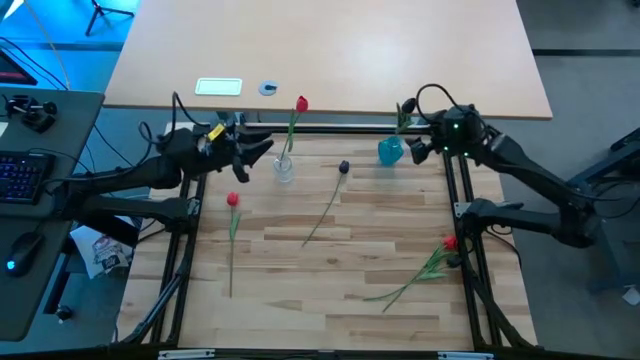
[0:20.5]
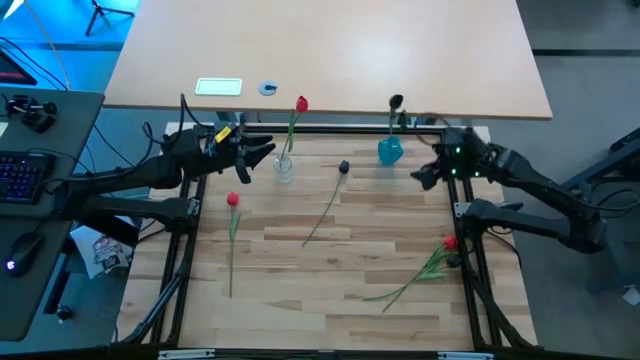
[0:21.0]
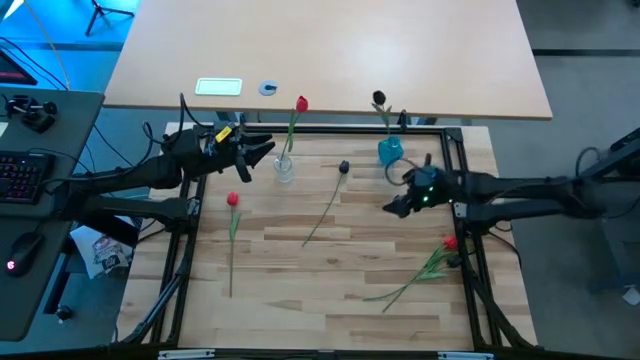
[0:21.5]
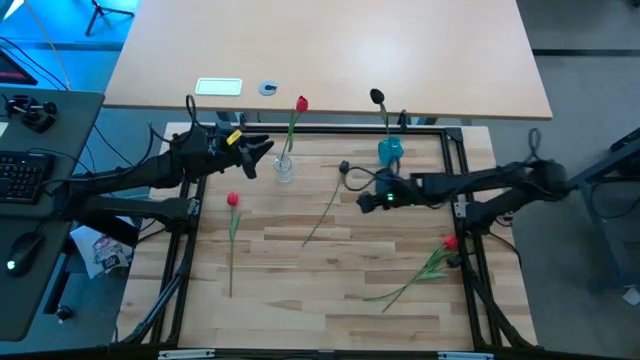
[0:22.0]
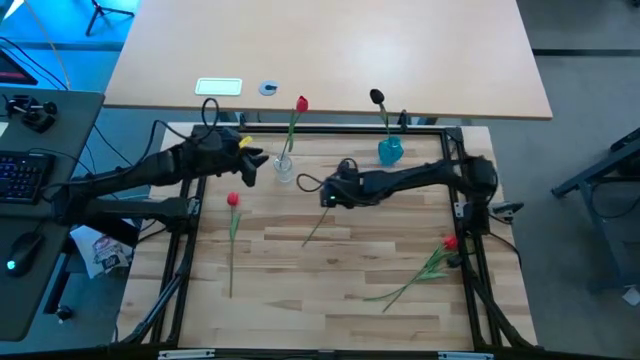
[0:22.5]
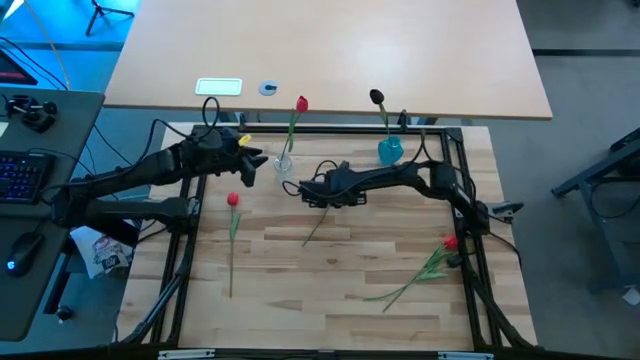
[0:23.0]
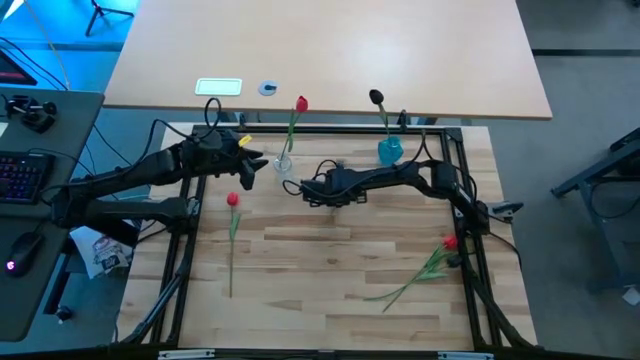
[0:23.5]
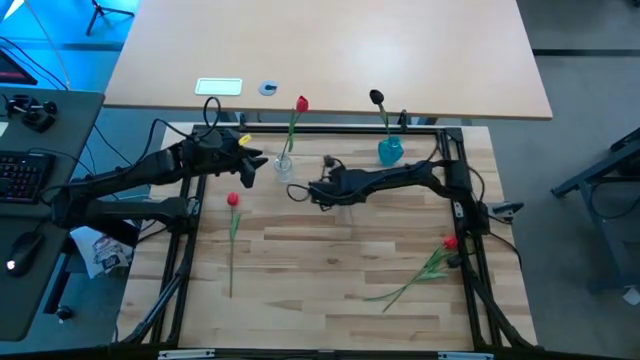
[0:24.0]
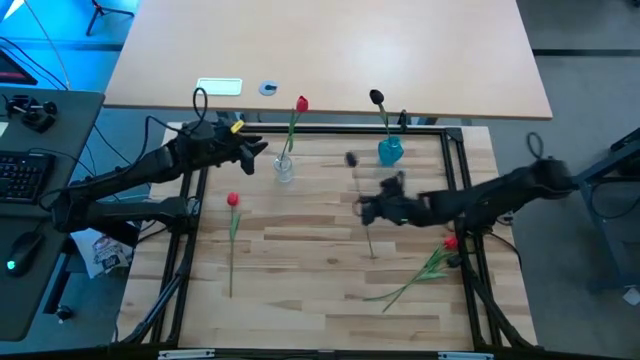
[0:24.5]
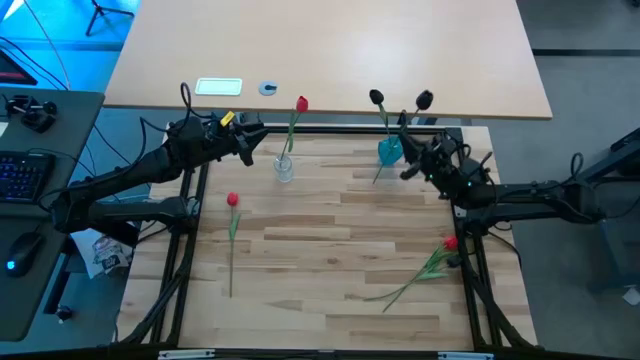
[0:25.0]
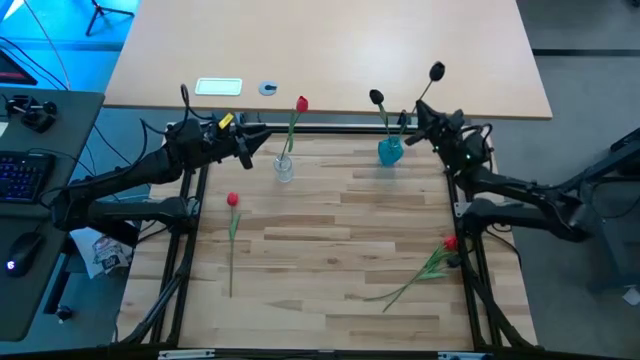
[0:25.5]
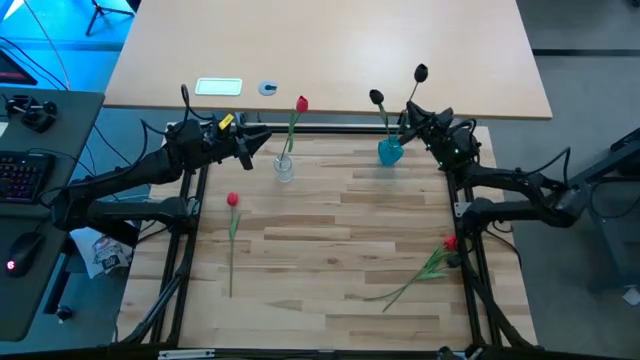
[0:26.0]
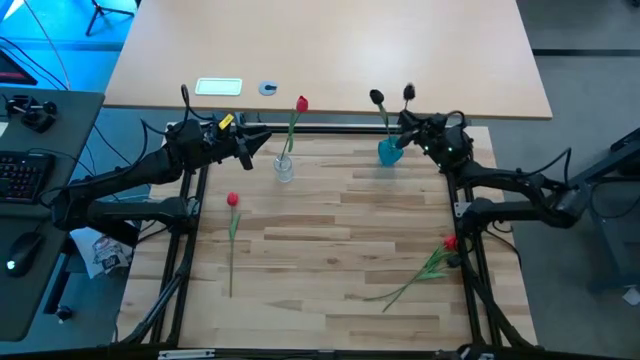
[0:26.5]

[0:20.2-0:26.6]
Task: Sort flowers into vase by color
Put the top black flower into the blue vase

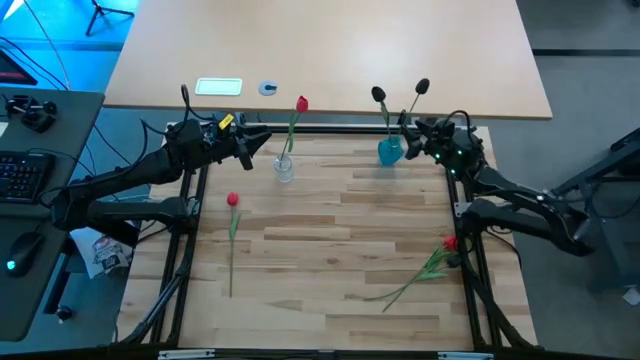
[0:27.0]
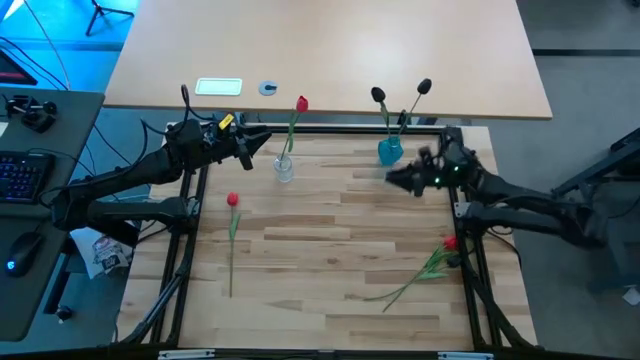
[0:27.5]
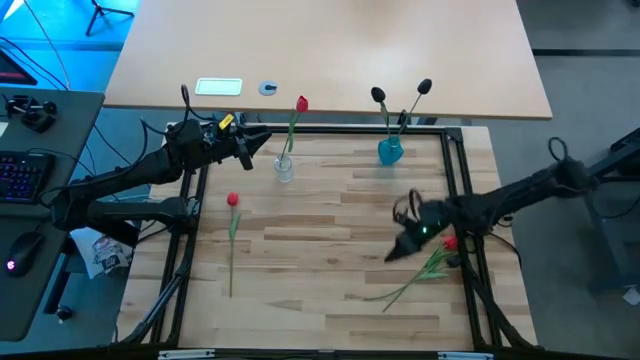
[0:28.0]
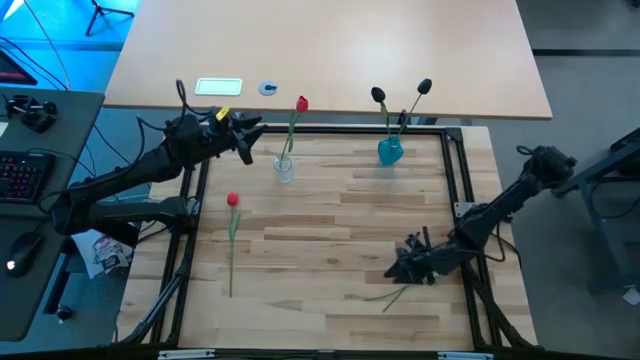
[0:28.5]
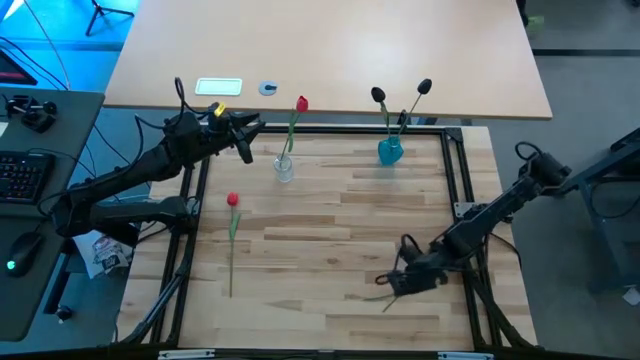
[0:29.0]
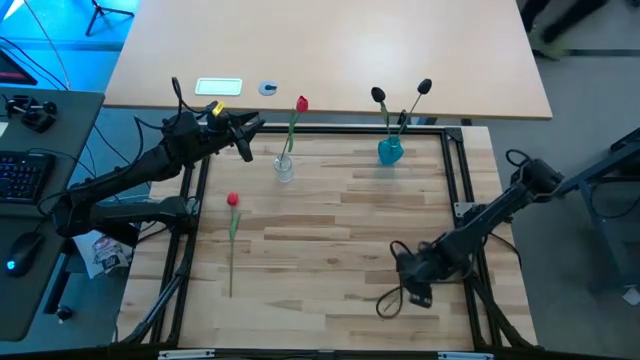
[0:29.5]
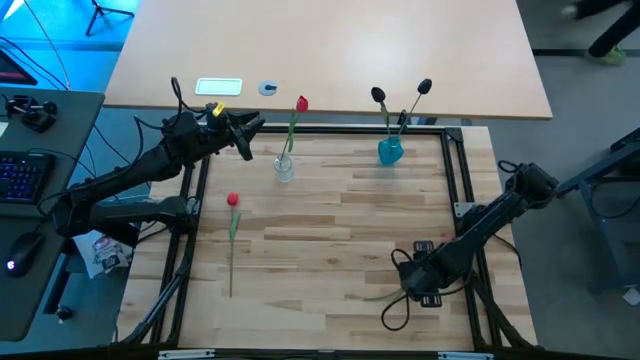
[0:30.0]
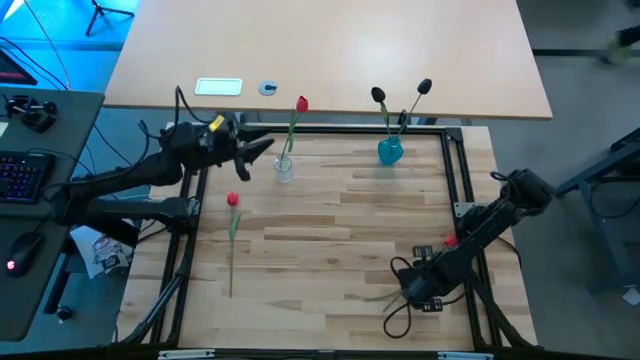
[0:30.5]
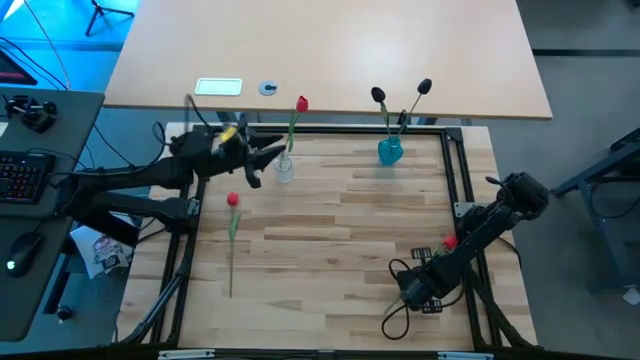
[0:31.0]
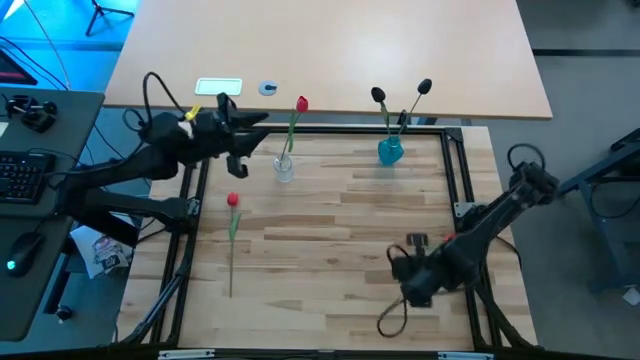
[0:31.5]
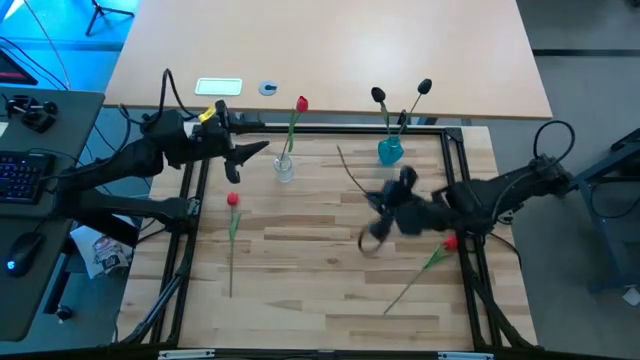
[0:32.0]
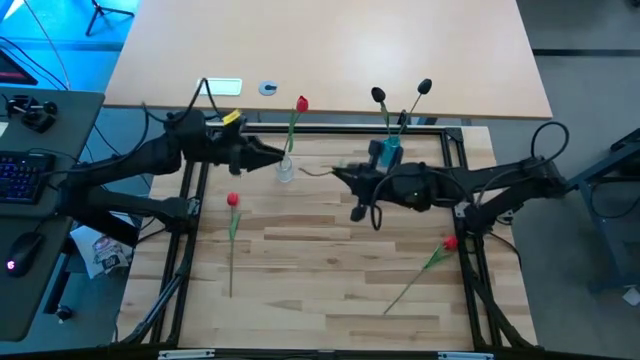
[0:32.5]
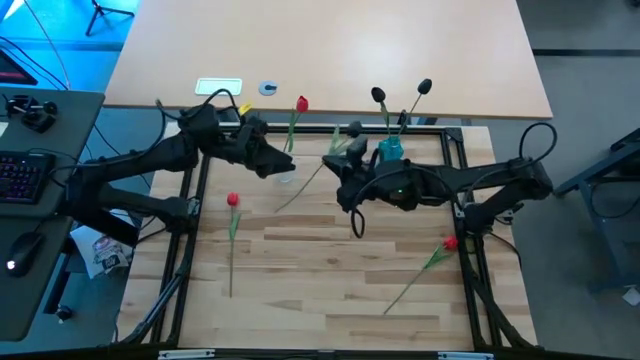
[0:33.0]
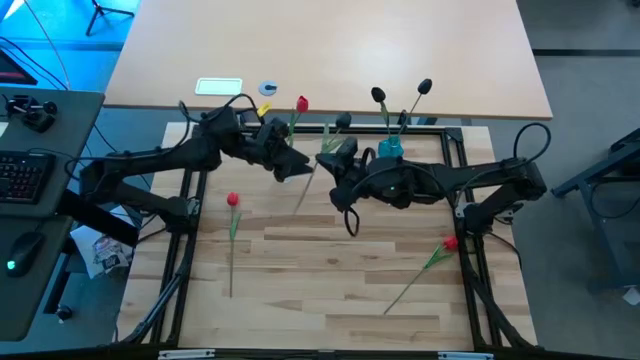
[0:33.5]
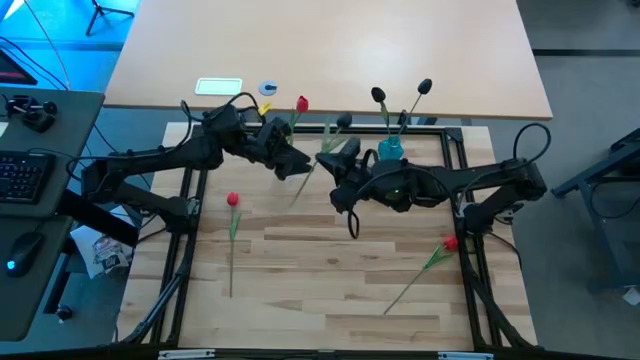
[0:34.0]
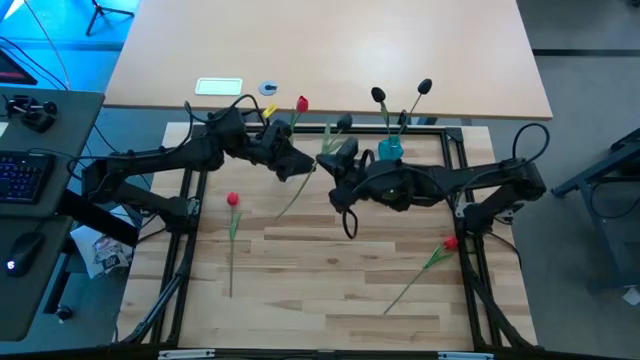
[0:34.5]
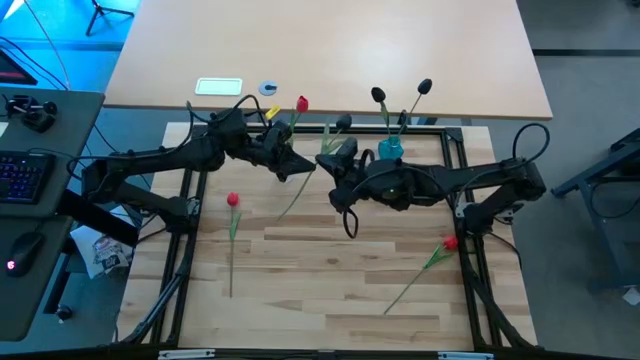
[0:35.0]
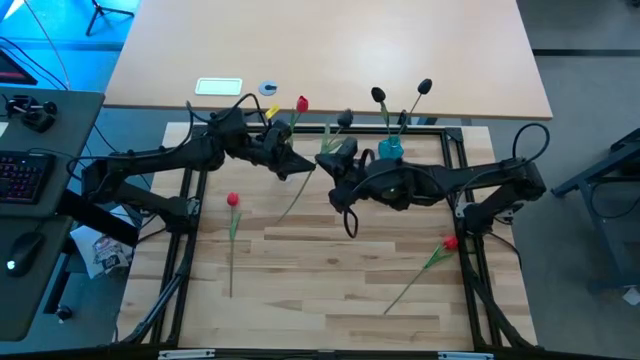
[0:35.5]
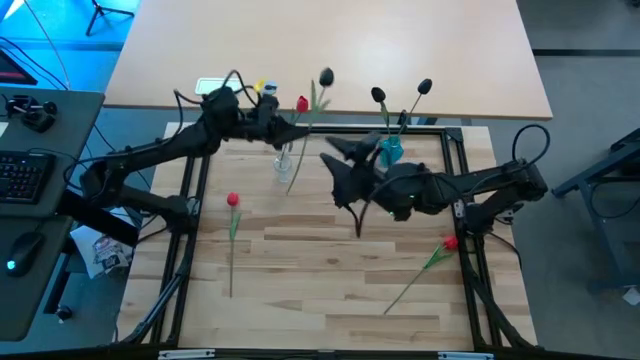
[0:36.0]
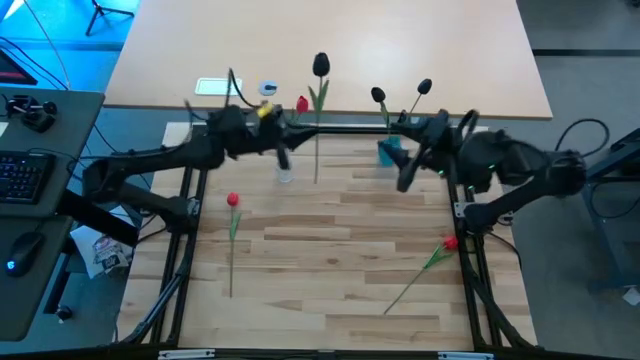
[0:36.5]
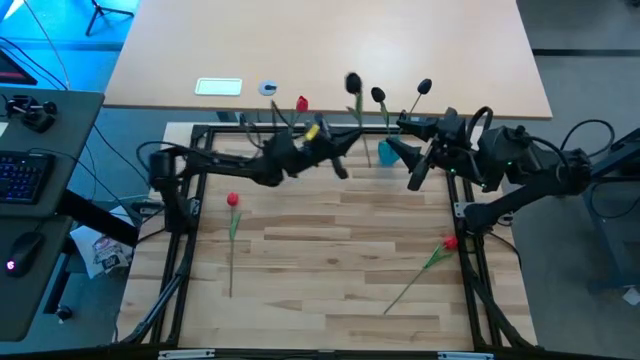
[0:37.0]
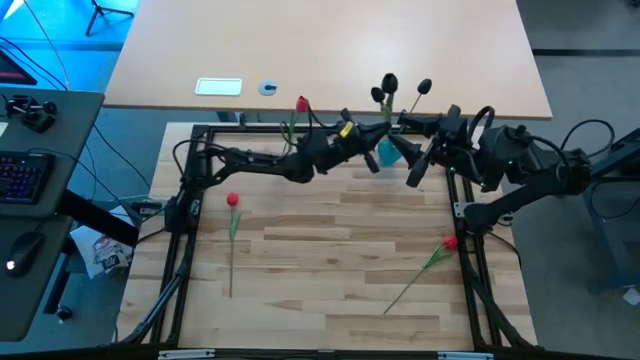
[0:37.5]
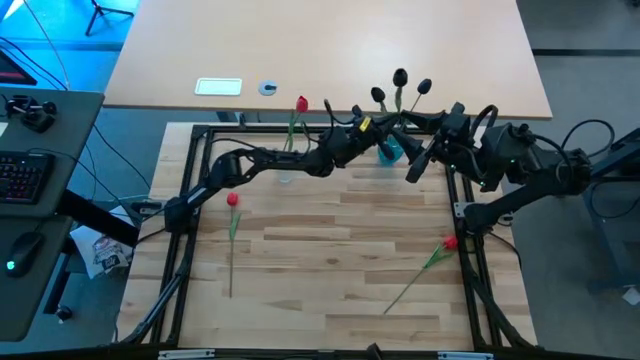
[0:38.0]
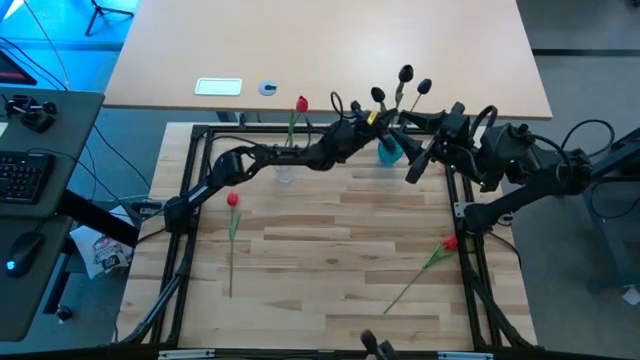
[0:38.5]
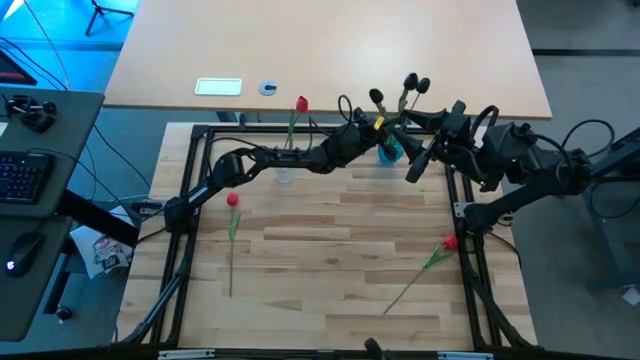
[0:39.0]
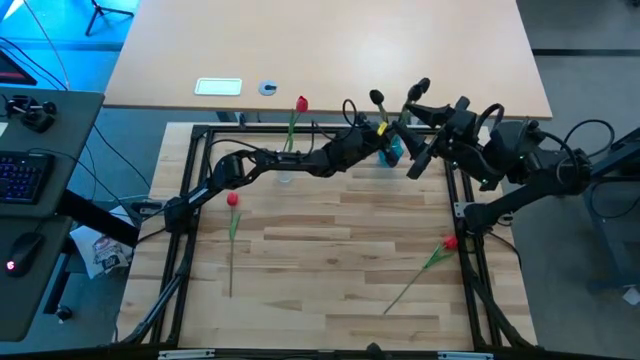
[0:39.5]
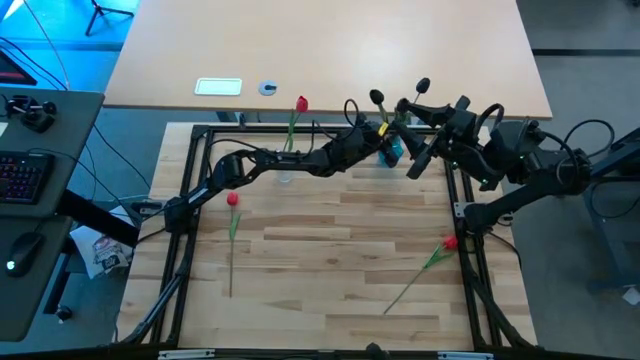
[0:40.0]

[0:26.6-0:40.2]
Put the black flower into the blue vase

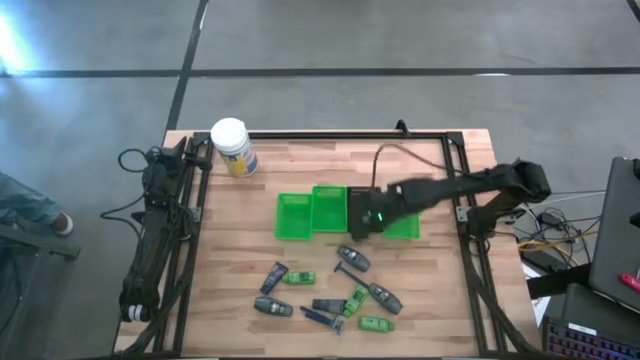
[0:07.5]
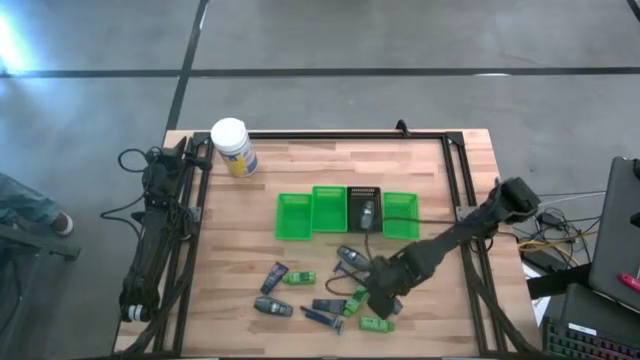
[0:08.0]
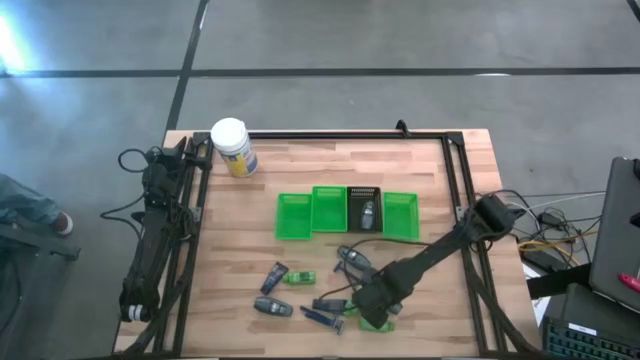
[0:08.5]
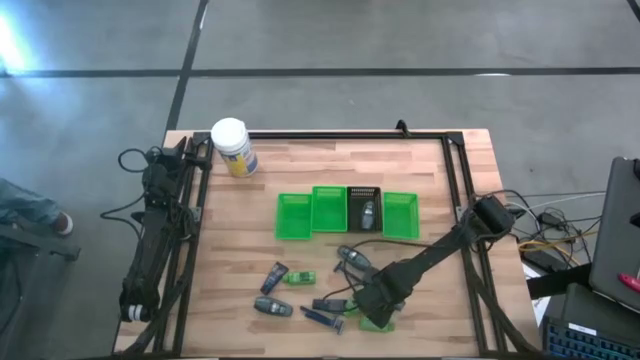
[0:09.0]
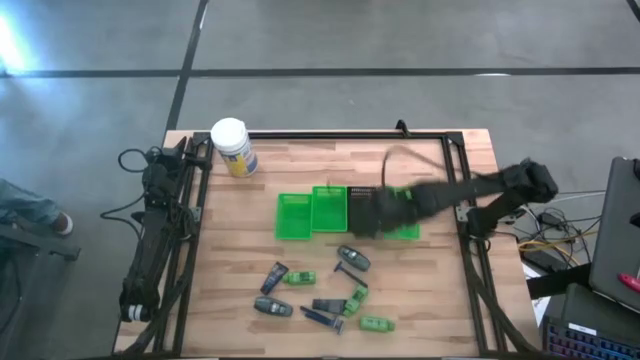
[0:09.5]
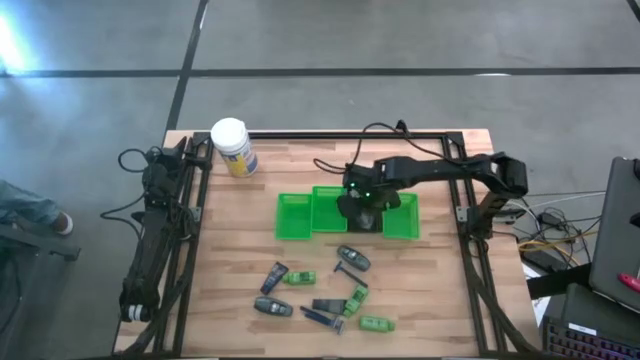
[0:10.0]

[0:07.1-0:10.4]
Task: Pick & Place Travel size toiletries
Put the gray deodorant into the black bin
